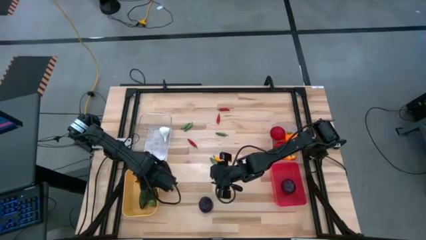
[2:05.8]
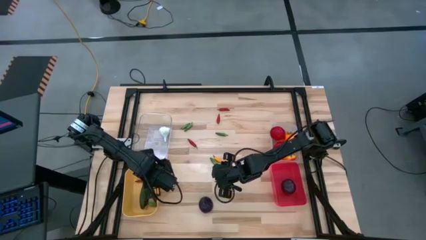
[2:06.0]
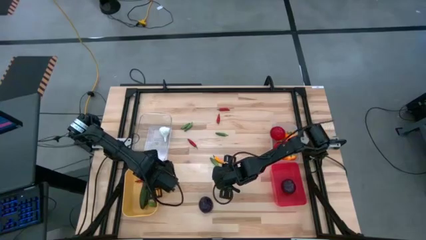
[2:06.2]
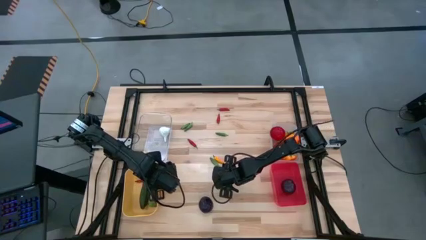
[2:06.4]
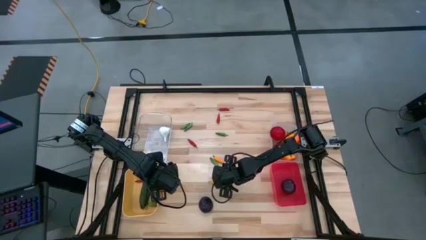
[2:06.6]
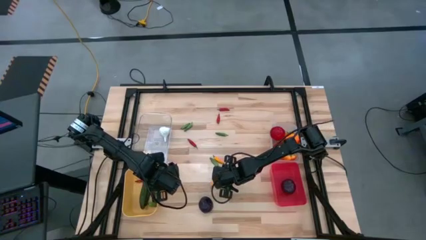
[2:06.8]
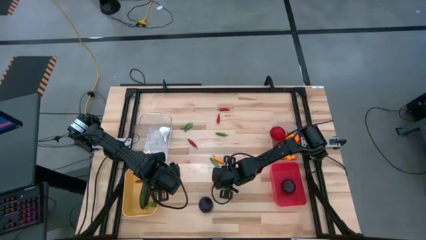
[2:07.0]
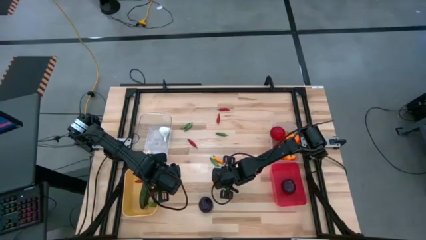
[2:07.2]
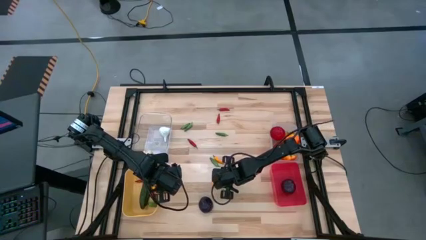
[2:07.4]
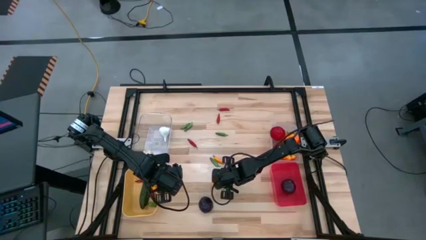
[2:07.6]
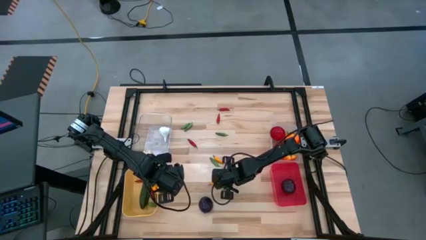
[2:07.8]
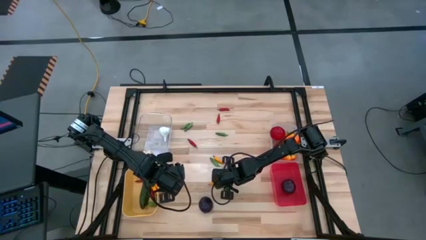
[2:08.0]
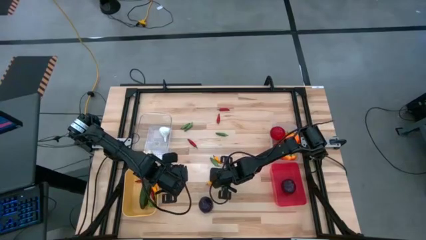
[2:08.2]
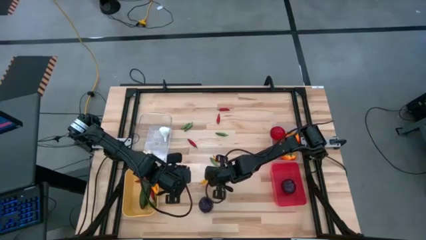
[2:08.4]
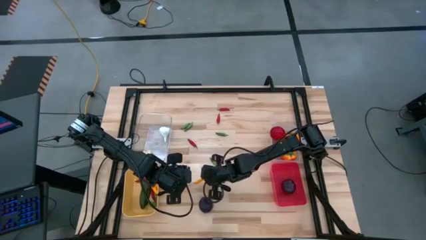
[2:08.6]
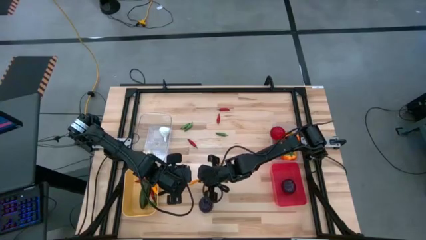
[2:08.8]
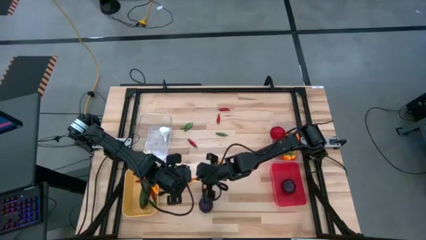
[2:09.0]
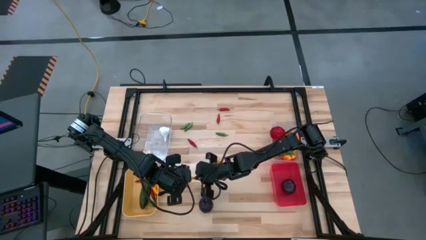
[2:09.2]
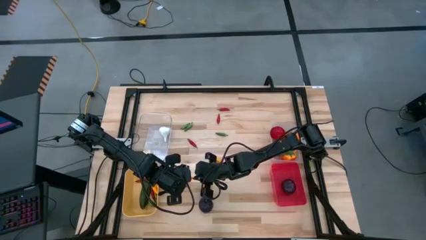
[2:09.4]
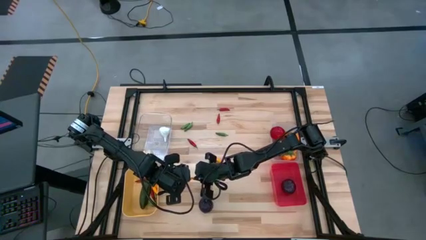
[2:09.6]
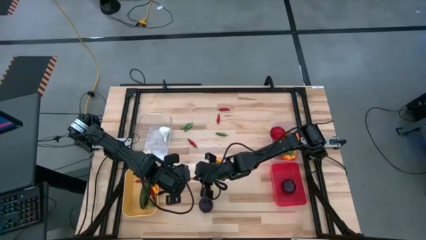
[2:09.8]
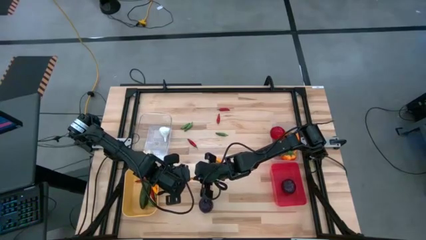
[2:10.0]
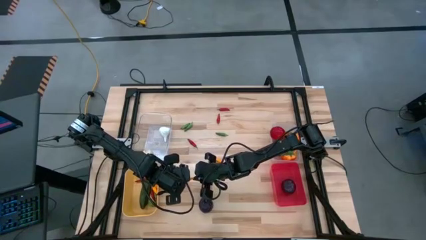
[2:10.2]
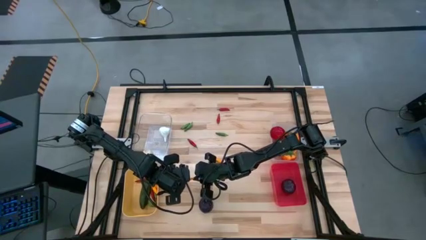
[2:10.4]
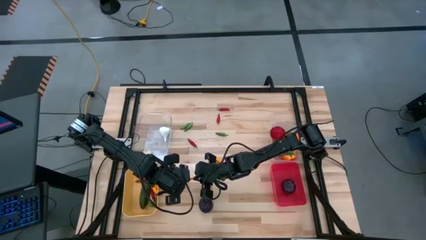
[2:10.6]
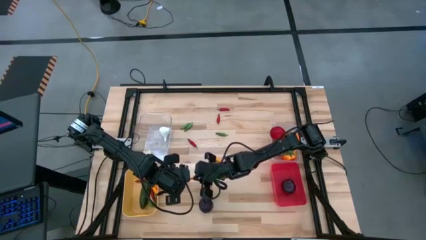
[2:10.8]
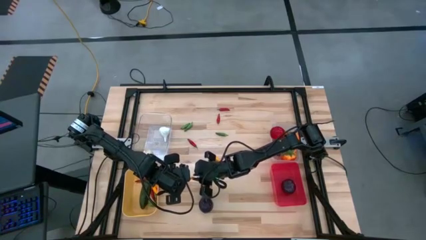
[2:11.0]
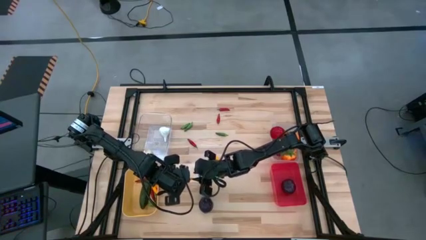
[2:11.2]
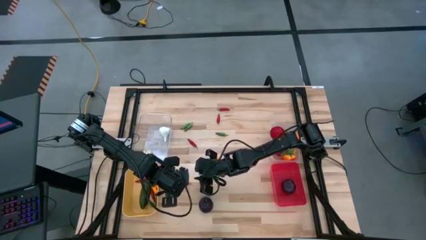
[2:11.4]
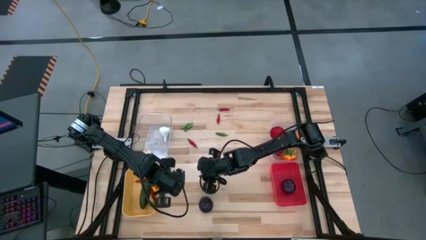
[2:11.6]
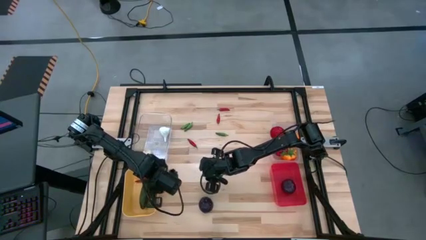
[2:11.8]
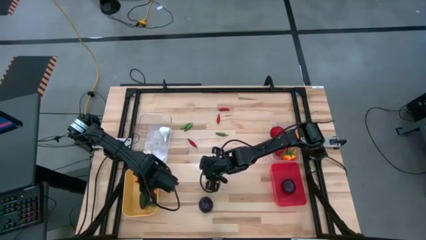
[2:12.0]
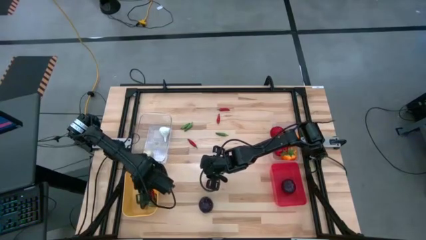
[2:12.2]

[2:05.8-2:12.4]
Task: Sort produce into baskets
Put the yellow chili pepper into the yellow bin

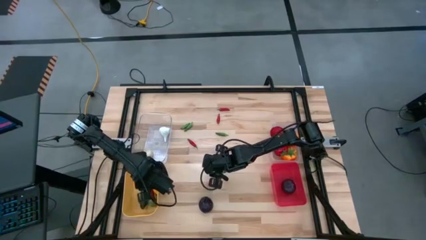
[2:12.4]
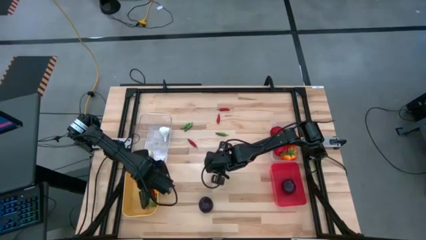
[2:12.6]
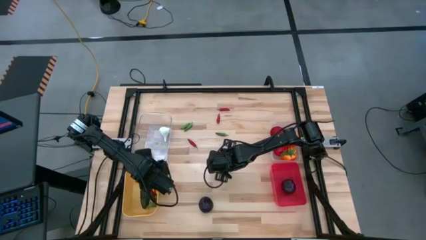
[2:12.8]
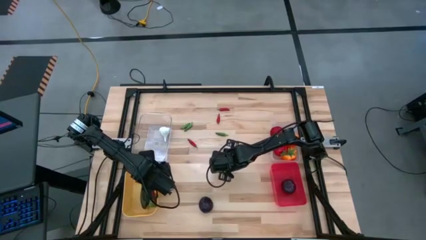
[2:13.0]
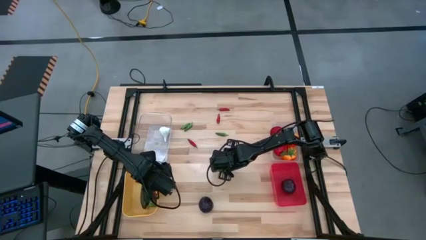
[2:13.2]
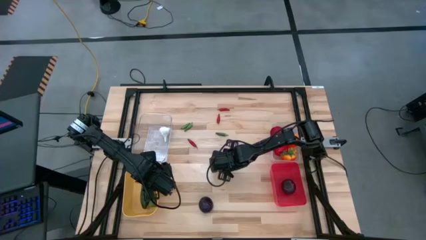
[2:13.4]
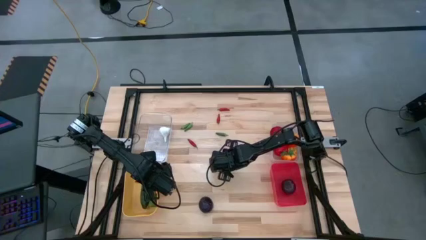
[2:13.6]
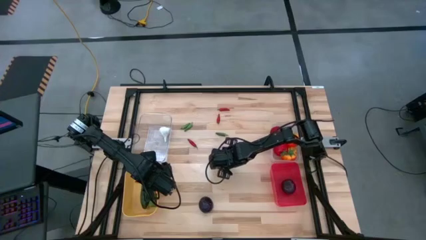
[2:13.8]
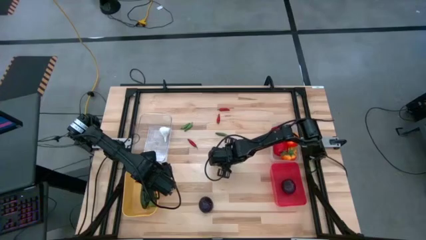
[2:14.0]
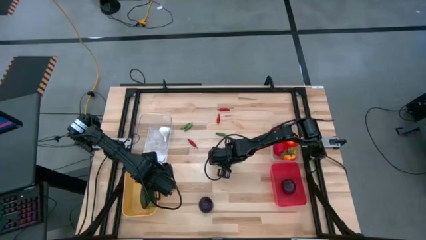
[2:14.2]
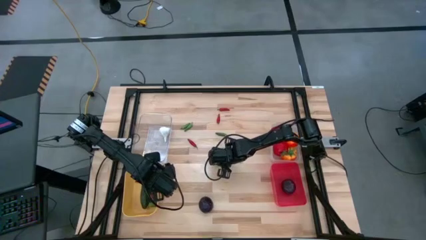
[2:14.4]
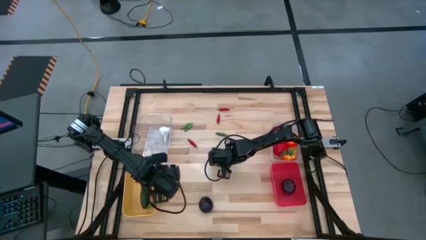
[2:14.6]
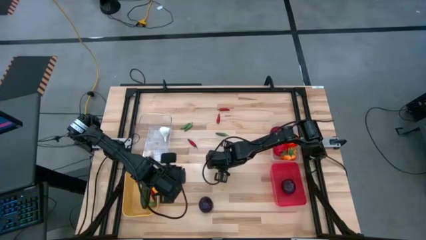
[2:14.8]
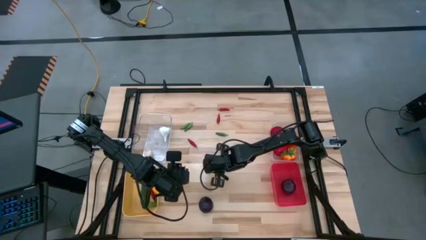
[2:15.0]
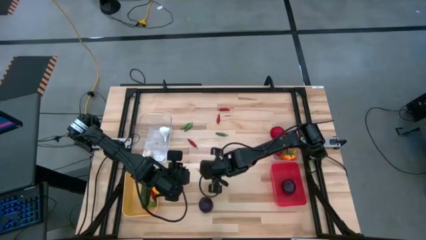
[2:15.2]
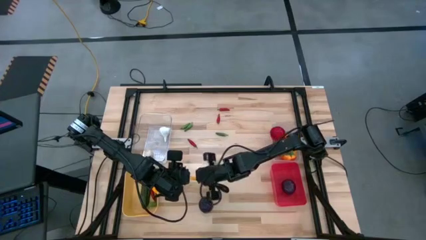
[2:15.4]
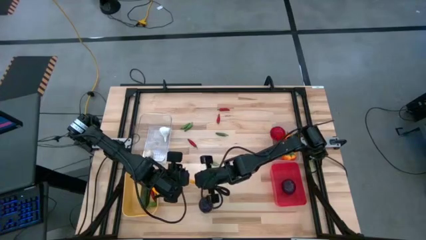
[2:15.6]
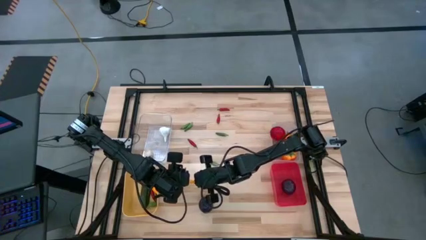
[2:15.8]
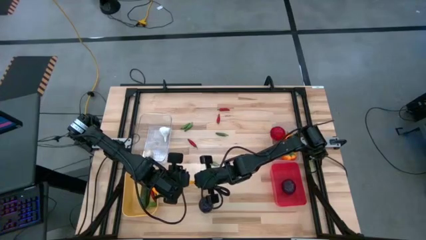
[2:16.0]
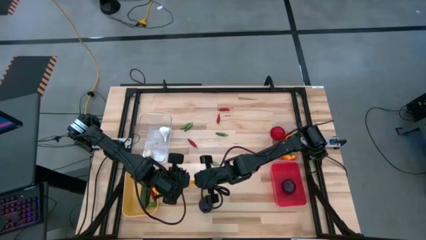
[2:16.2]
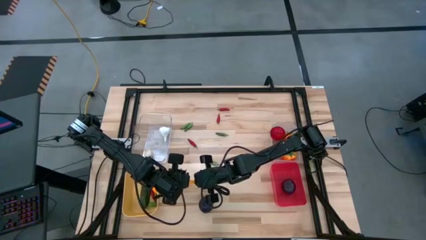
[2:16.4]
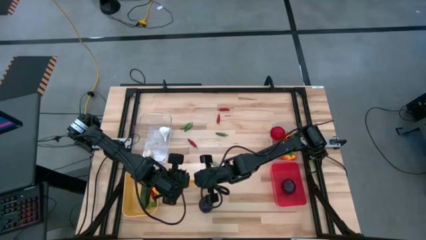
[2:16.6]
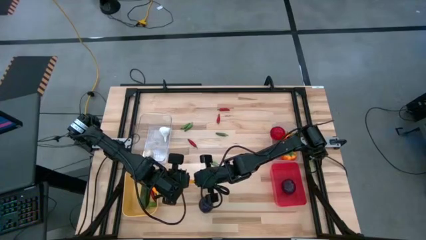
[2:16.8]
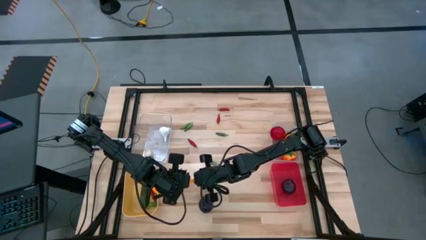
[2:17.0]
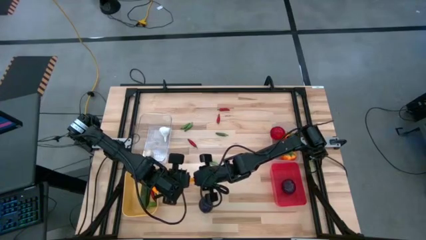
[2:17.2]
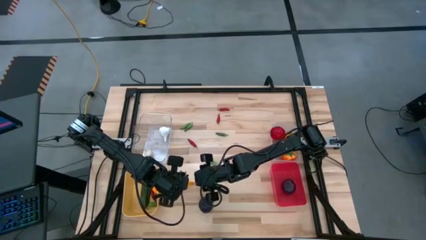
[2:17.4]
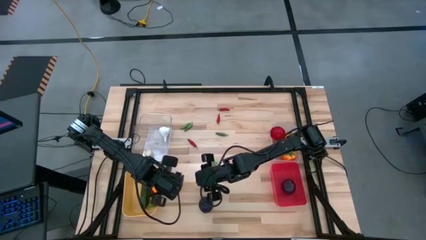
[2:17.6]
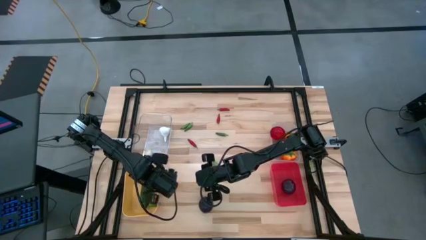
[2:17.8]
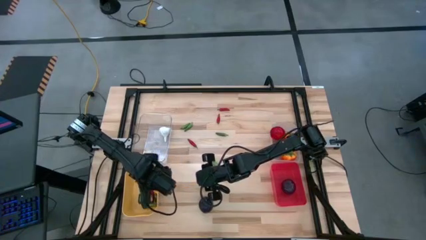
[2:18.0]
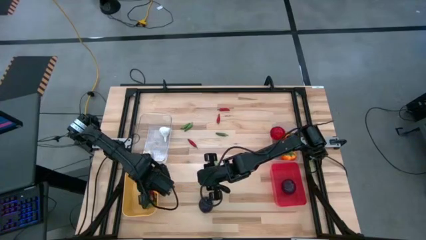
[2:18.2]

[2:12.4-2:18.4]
Put the yellow chili pepper into the yellow bin

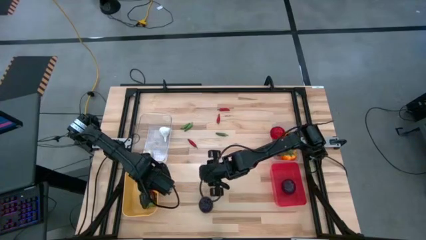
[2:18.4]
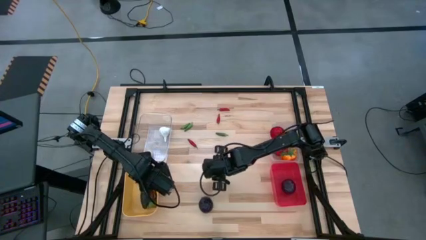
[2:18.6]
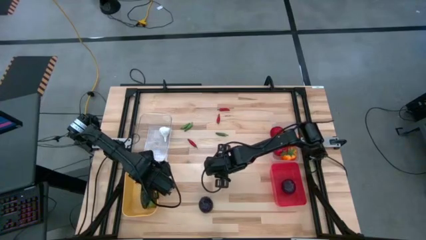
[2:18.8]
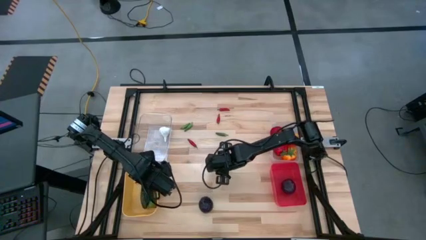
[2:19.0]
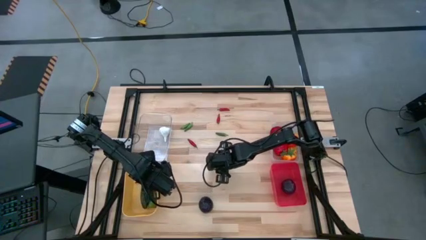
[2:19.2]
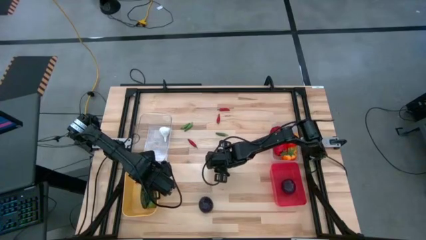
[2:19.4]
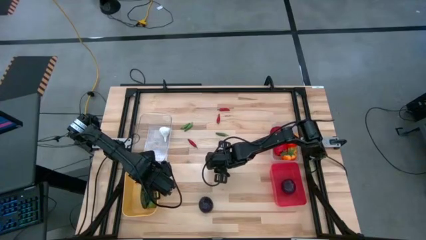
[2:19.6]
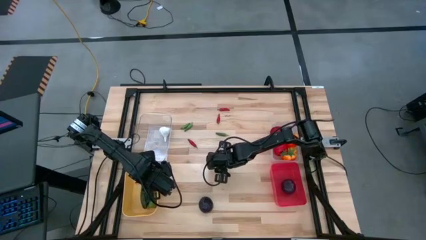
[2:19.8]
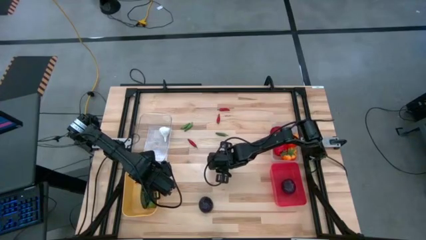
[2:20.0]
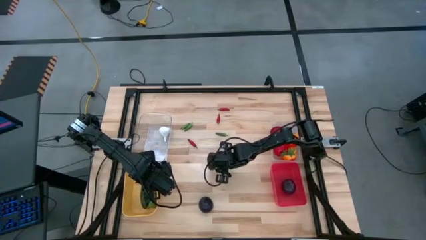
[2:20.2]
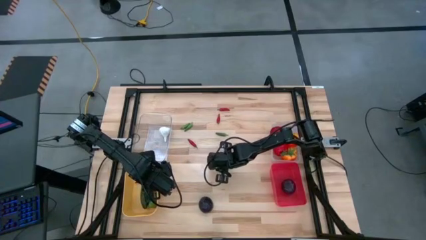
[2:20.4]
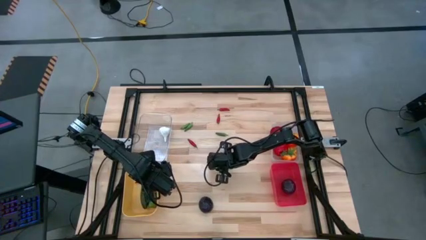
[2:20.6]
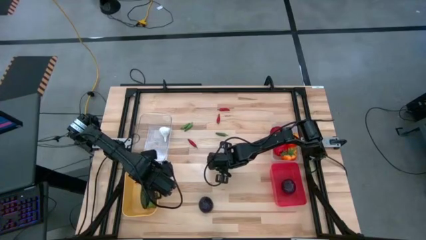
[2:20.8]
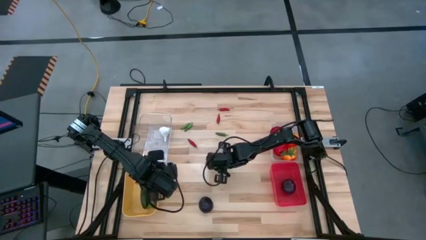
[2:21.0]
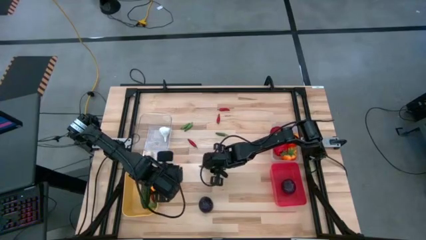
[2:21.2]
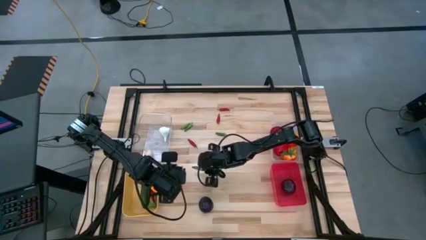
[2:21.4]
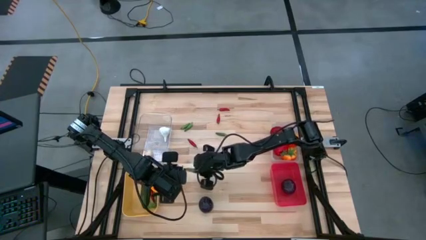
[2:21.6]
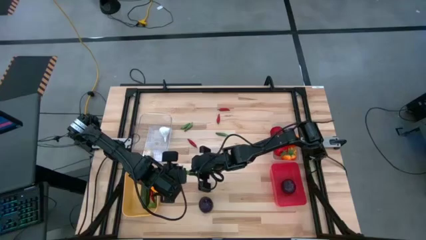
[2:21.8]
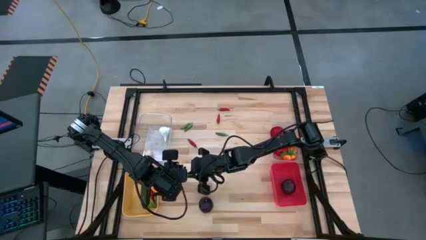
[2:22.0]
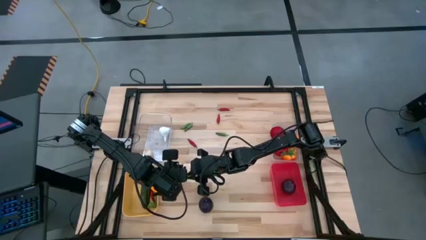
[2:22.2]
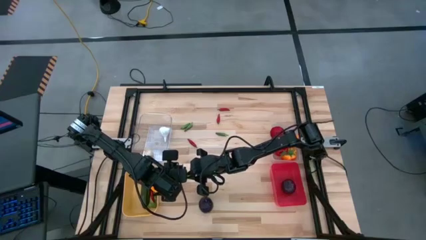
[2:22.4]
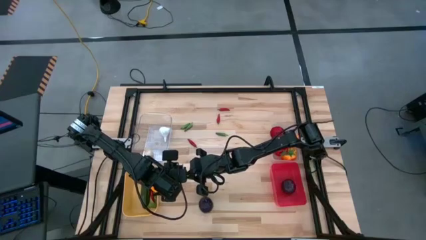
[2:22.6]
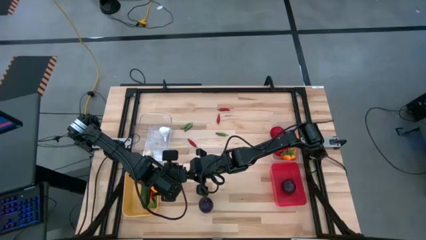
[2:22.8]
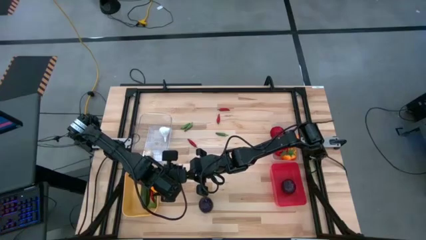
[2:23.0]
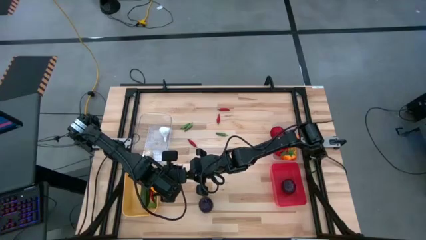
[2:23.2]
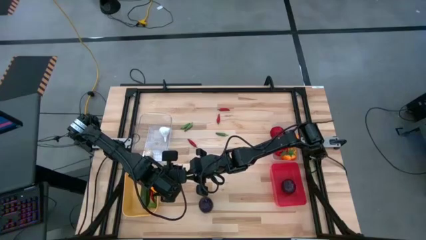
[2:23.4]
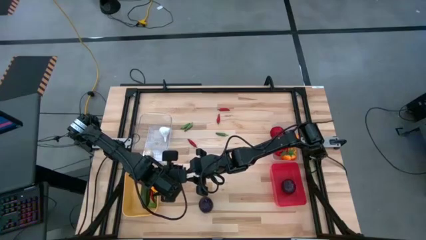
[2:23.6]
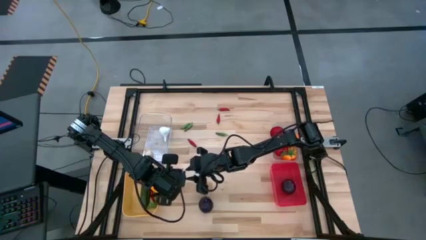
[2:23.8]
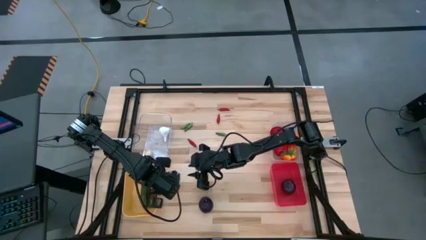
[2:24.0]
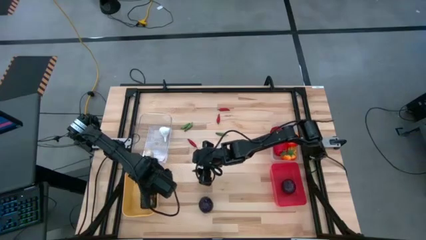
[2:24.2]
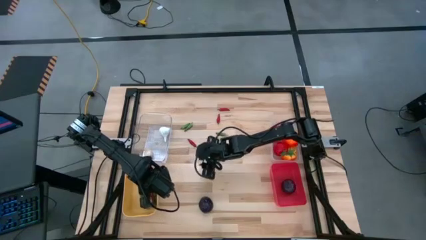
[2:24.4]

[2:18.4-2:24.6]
Put the green chili pepper into the yellow bin
